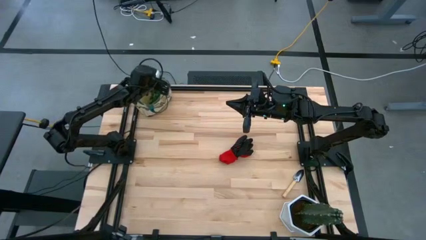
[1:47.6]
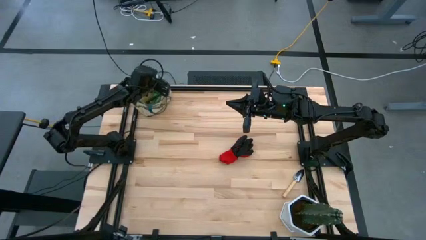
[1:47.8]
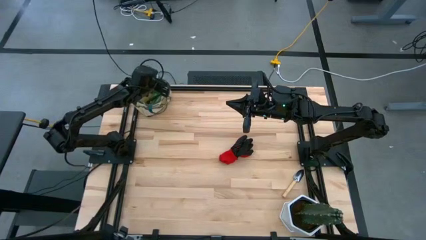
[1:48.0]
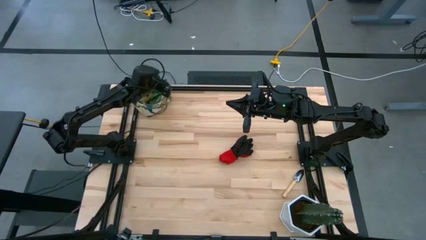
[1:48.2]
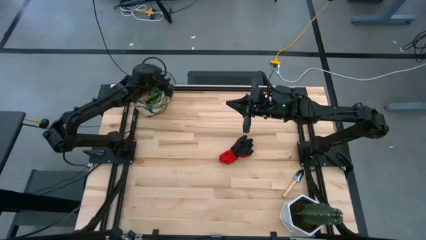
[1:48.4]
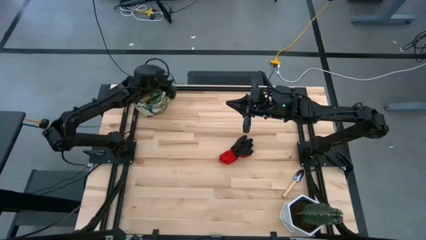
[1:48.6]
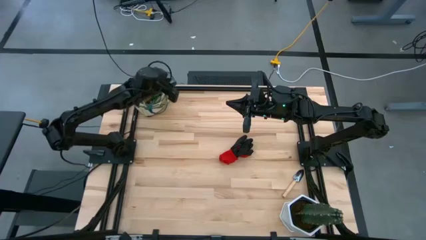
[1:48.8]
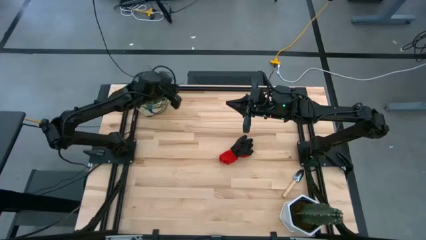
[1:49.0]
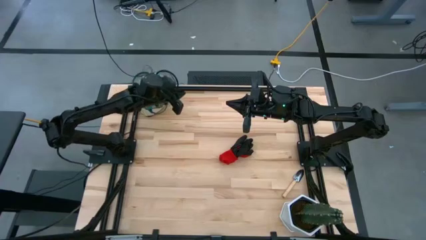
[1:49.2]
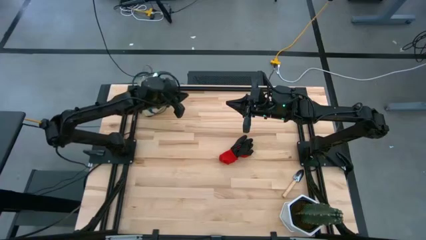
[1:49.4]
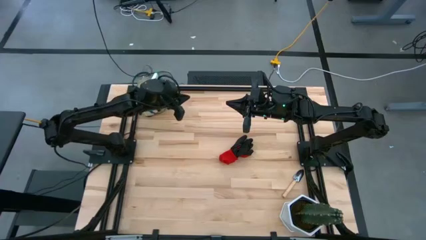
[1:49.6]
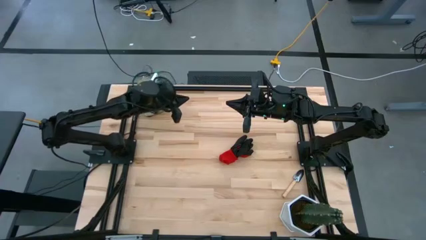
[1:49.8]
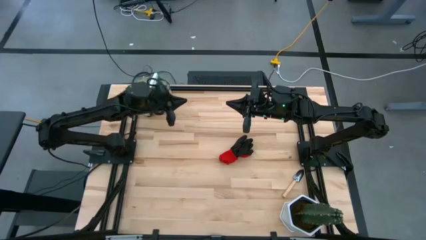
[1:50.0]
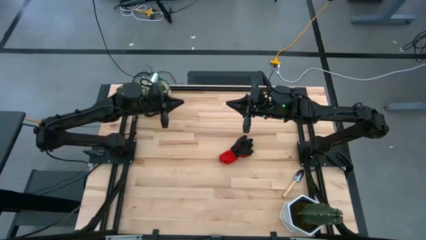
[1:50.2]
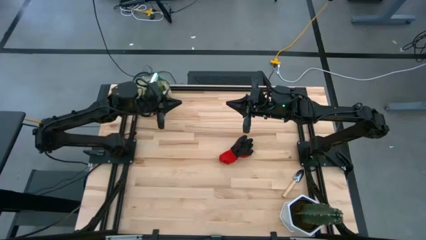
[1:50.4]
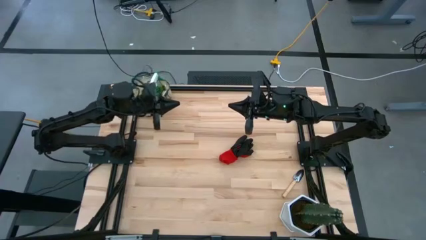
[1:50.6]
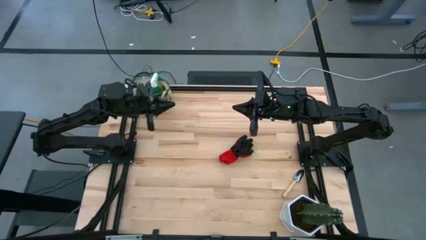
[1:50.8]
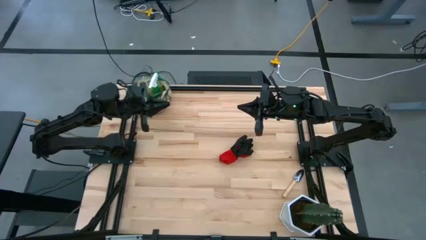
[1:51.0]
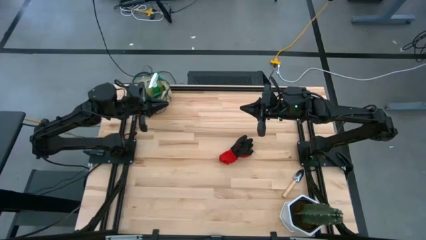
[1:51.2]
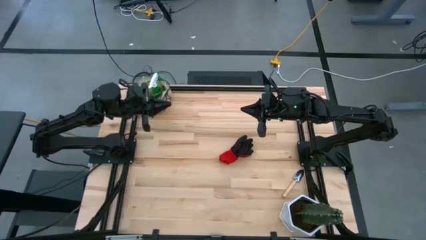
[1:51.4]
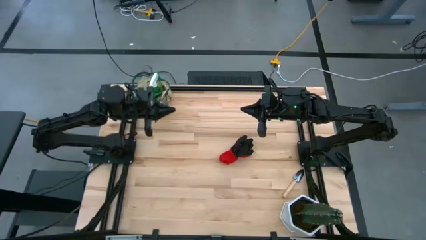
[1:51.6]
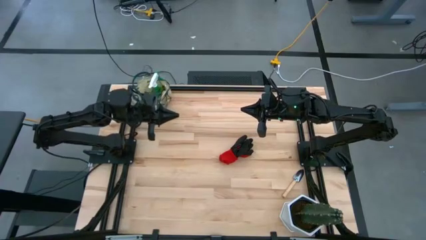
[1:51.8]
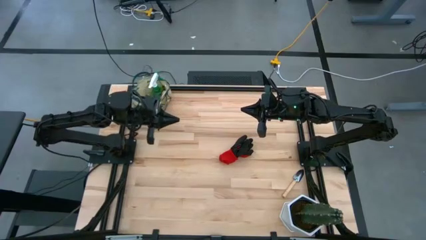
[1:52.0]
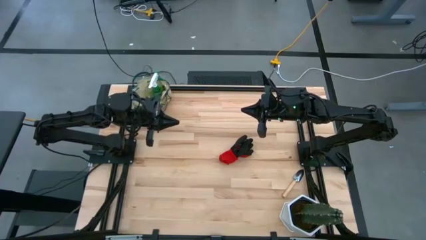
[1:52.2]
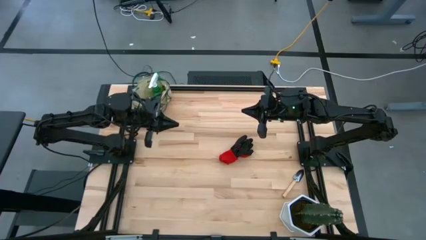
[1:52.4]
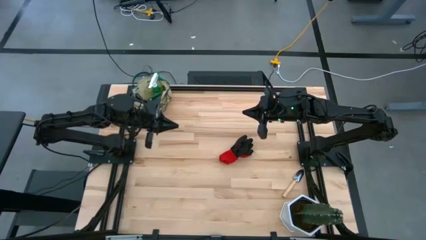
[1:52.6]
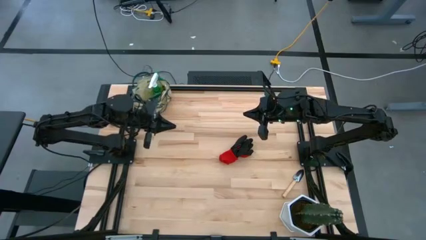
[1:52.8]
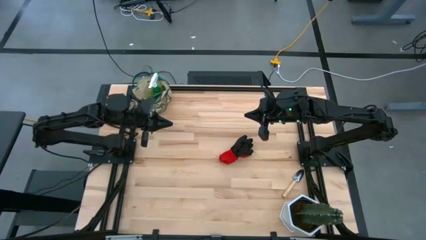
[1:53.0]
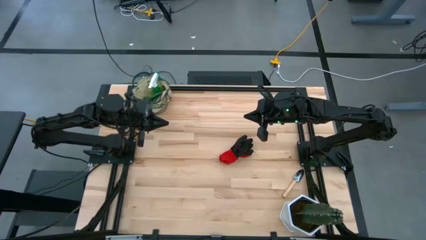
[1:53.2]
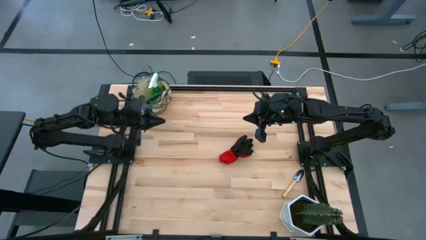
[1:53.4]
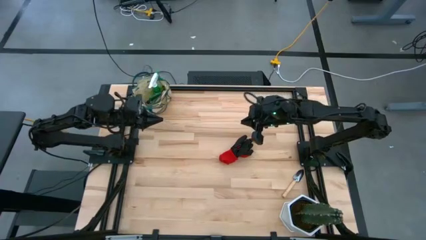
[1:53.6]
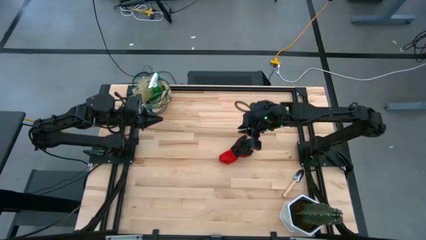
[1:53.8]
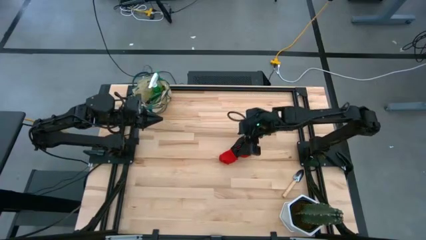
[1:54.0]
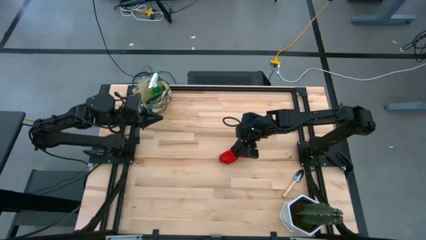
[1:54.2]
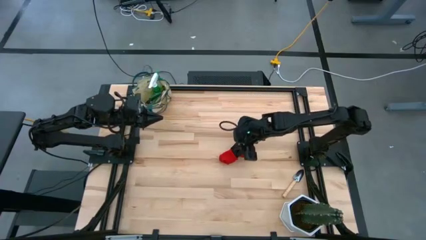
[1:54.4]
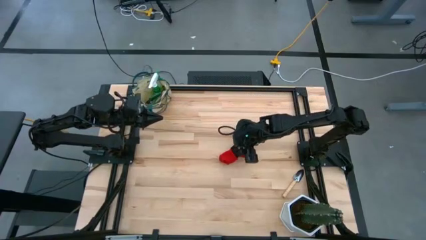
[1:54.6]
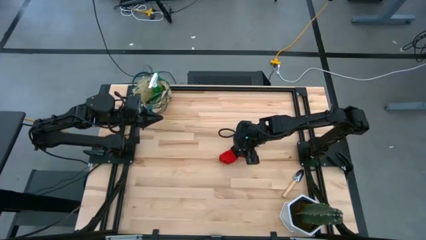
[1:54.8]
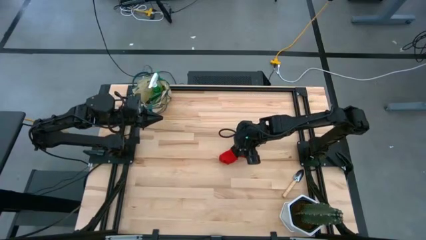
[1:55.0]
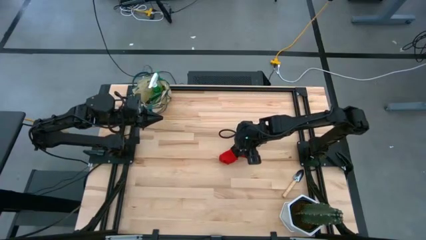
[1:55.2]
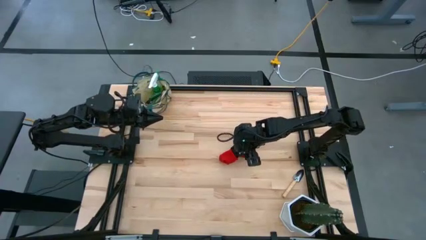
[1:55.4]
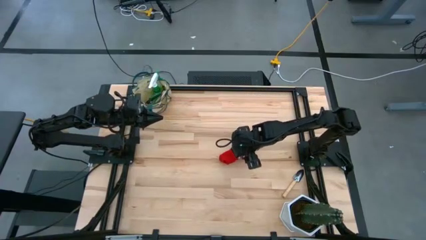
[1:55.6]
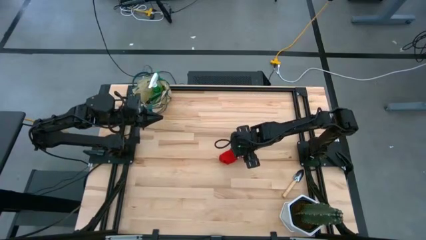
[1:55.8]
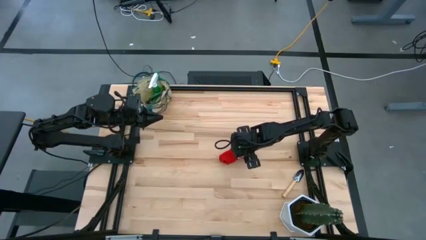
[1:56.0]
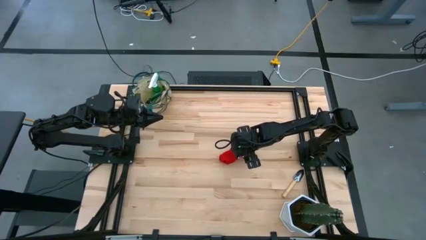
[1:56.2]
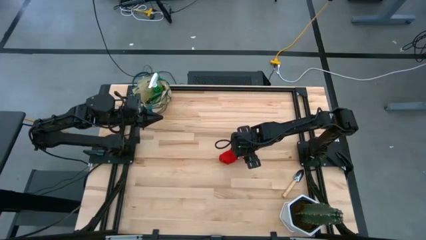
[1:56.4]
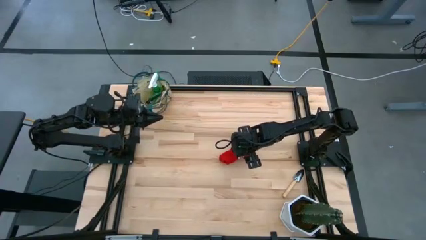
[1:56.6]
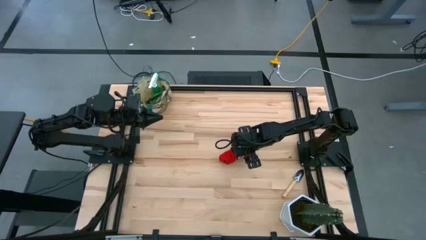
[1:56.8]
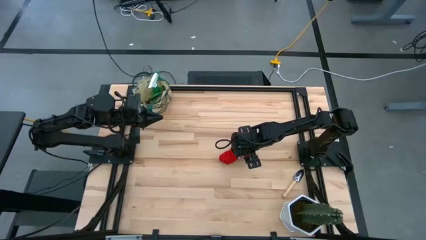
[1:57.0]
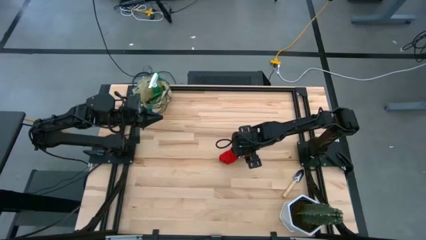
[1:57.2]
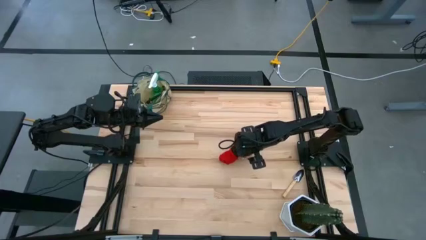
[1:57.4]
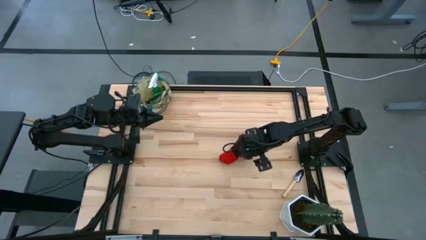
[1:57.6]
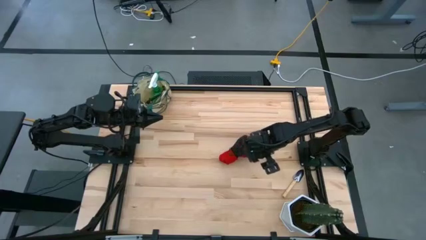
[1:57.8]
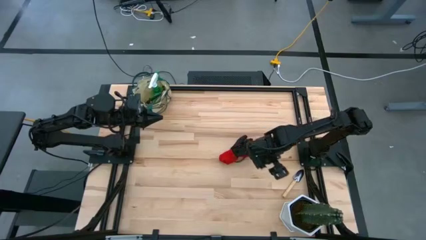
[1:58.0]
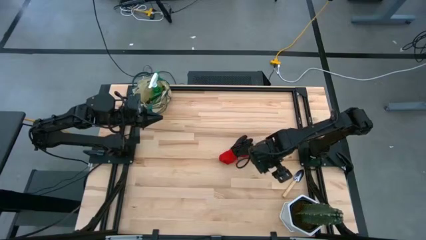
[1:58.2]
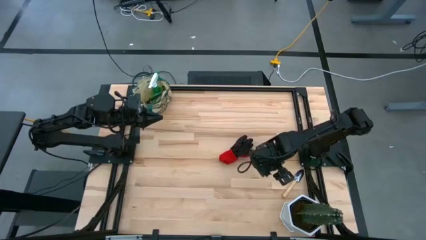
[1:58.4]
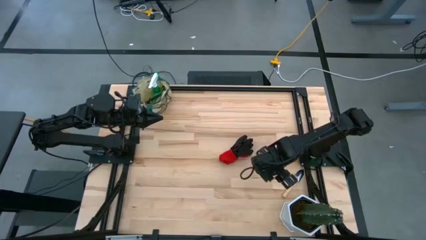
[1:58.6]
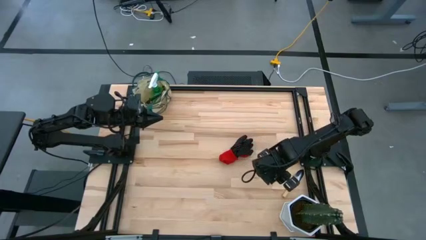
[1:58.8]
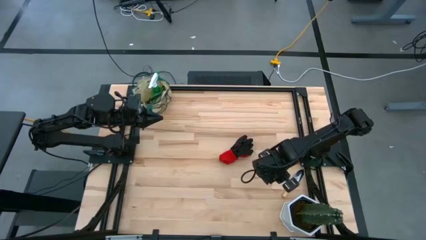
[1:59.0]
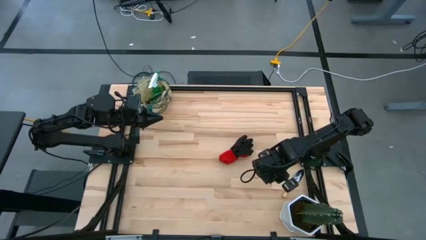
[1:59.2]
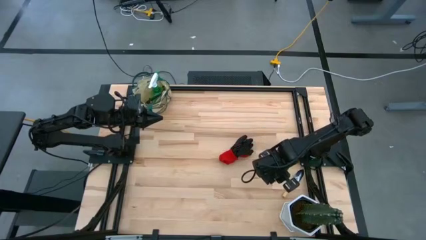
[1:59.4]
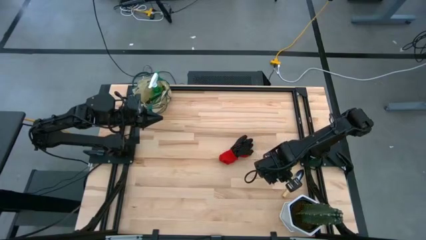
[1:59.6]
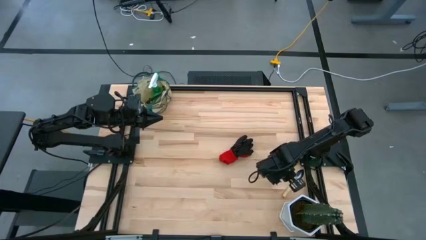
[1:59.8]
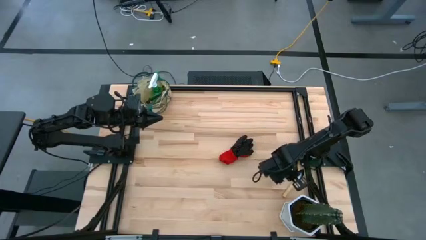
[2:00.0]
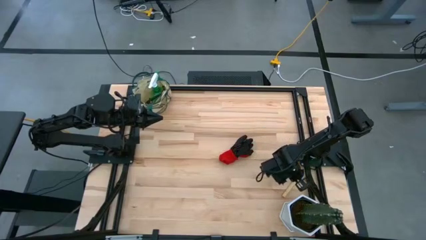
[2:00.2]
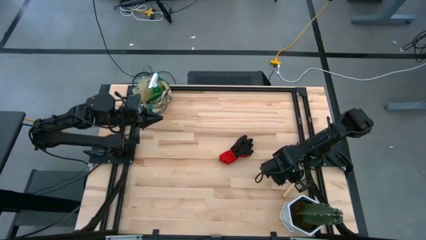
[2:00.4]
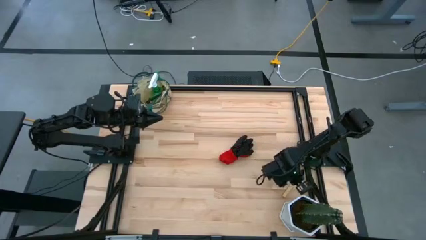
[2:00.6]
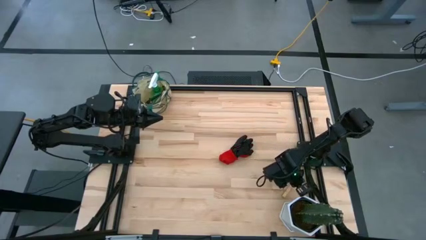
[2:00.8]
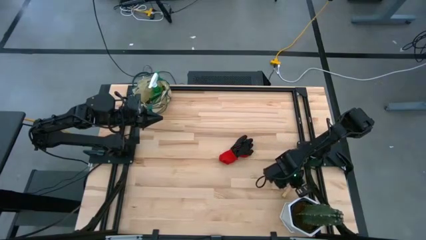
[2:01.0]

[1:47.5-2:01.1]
Task: Pick & Place Garden tools in Gardening bag
Put the trowel into the gardening bag

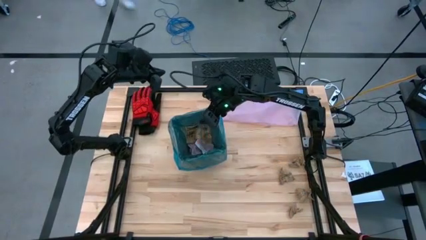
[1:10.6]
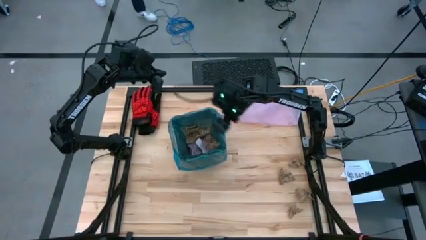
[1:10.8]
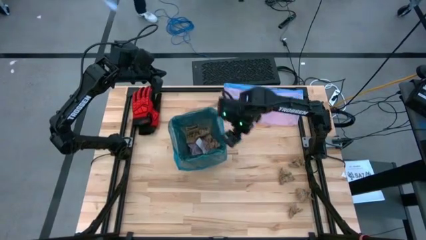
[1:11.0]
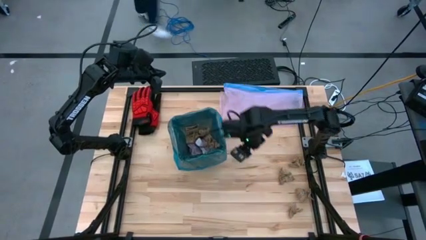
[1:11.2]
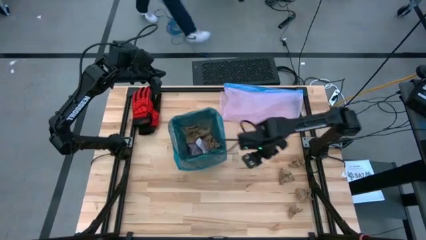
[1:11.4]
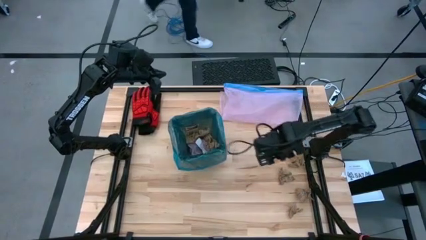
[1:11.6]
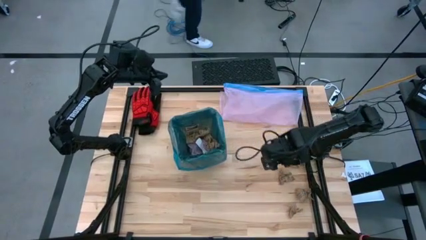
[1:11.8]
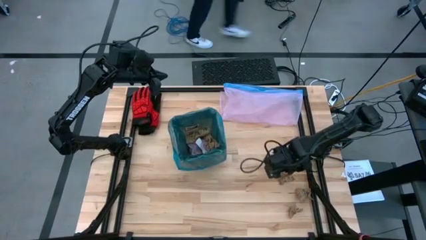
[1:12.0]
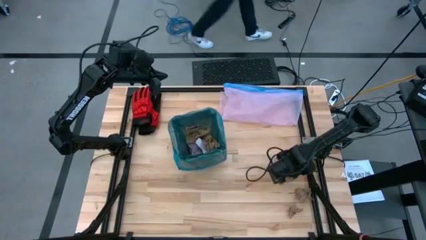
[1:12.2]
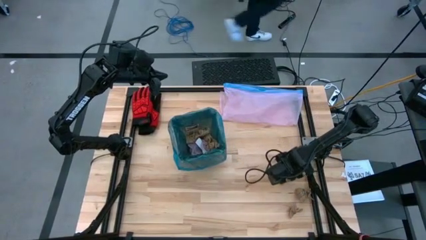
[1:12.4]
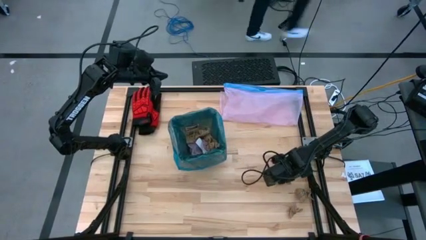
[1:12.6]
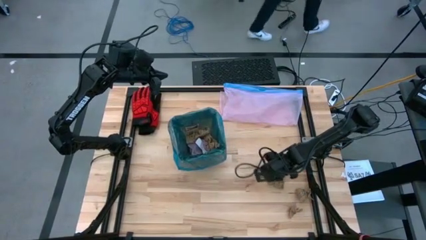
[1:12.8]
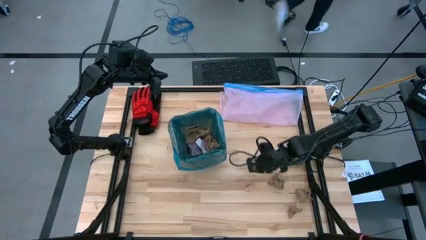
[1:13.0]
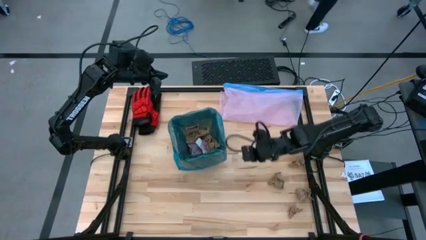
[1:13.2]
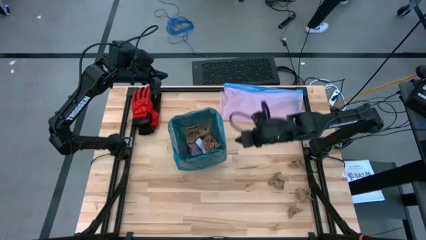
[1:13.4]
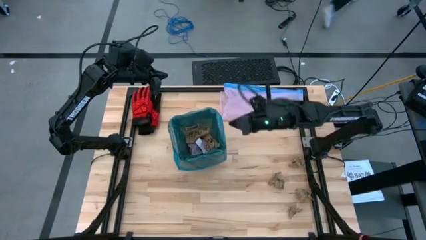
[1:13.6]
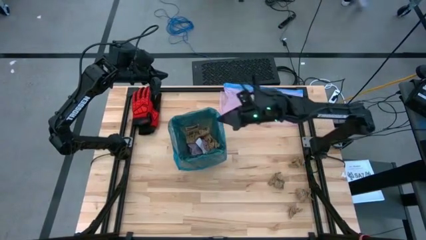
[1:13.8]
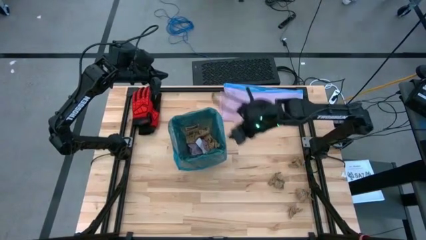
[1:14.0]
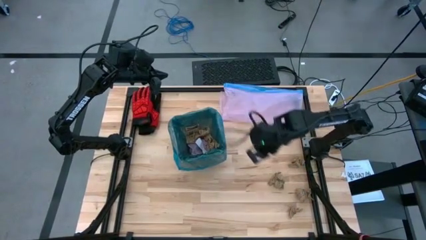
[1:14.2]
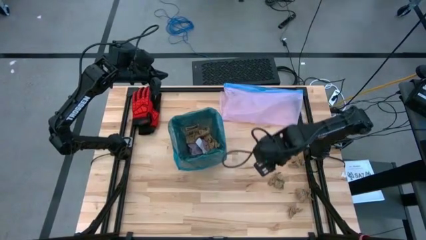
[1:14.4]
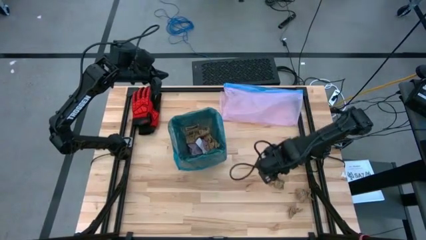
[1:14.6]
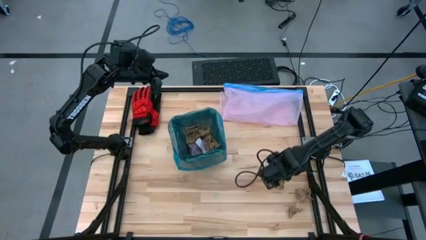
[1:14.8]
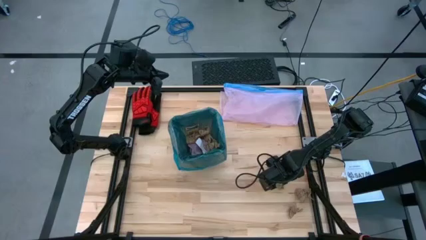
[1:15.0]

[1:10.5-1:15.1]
Task: place trash/remove bag and relplace
Put the brown napkin into the black trash bin
